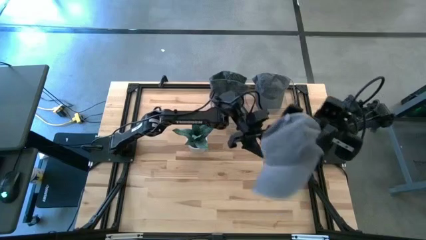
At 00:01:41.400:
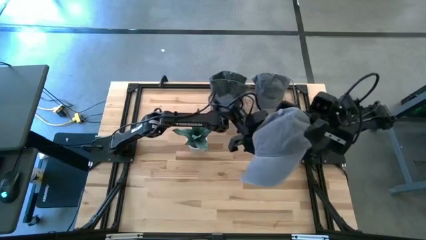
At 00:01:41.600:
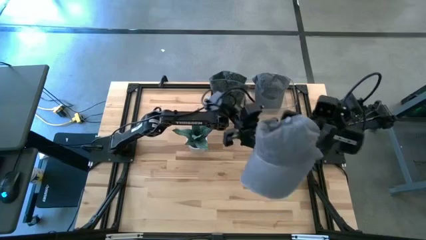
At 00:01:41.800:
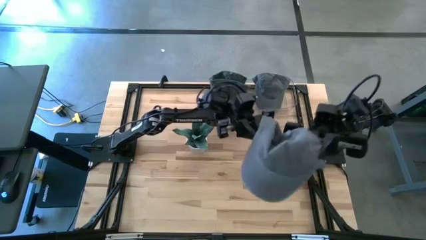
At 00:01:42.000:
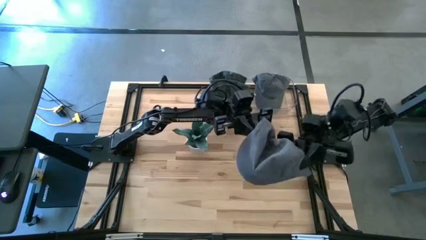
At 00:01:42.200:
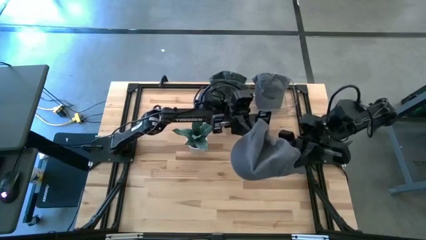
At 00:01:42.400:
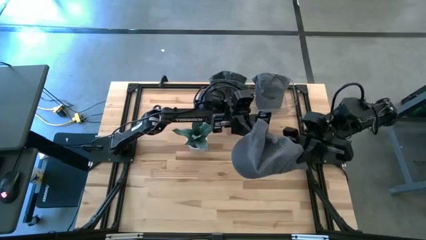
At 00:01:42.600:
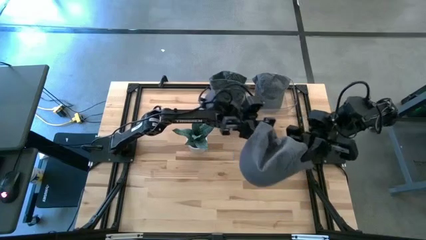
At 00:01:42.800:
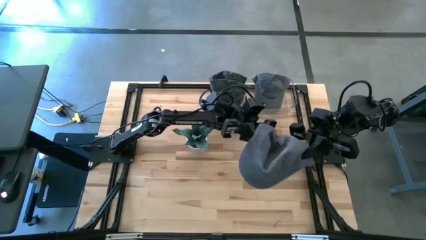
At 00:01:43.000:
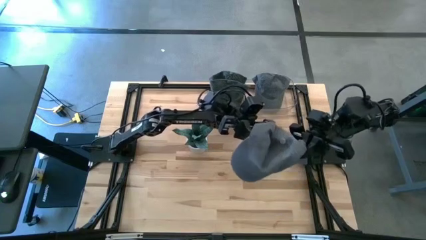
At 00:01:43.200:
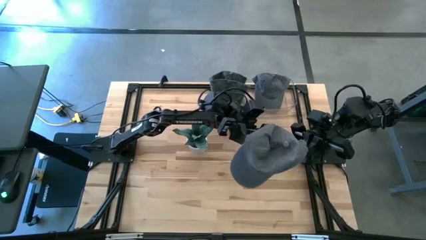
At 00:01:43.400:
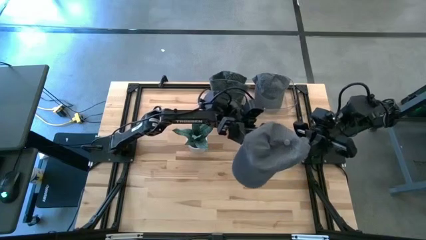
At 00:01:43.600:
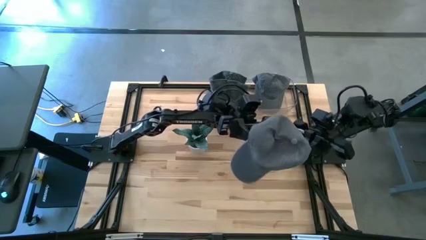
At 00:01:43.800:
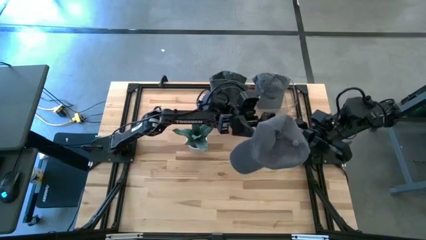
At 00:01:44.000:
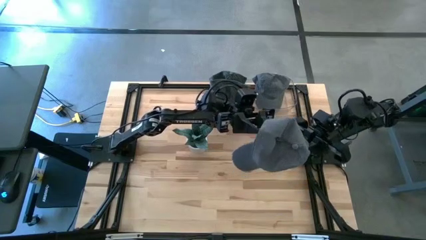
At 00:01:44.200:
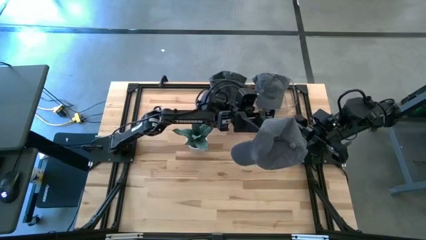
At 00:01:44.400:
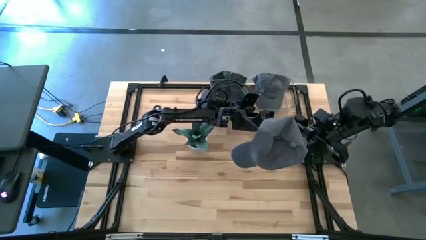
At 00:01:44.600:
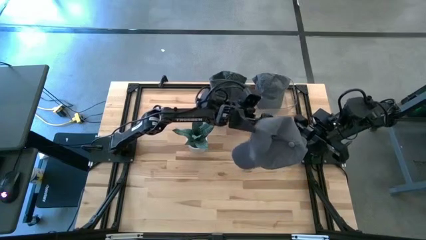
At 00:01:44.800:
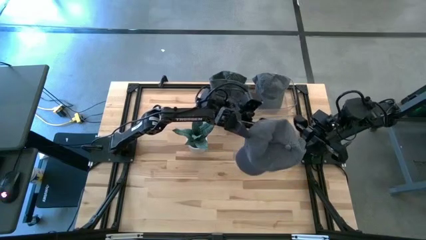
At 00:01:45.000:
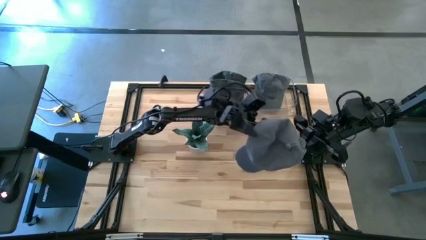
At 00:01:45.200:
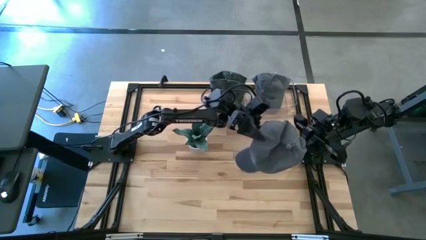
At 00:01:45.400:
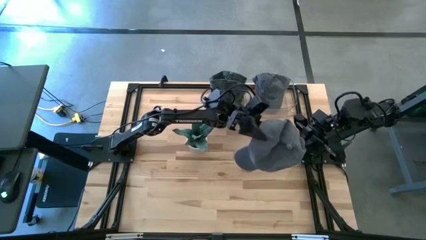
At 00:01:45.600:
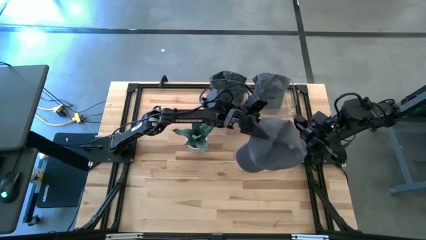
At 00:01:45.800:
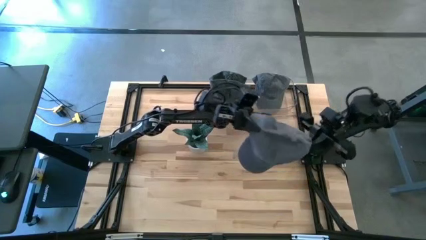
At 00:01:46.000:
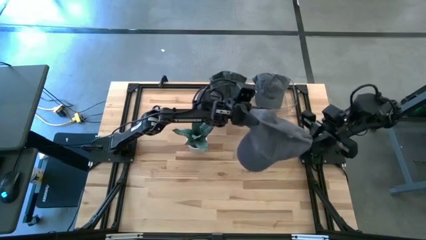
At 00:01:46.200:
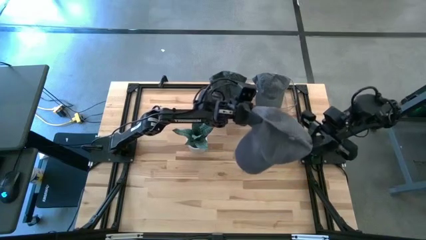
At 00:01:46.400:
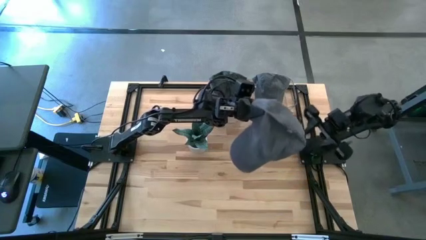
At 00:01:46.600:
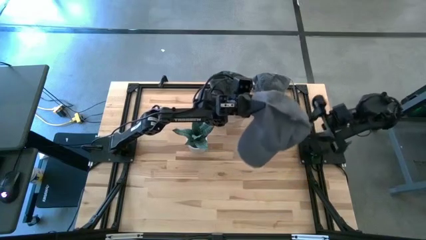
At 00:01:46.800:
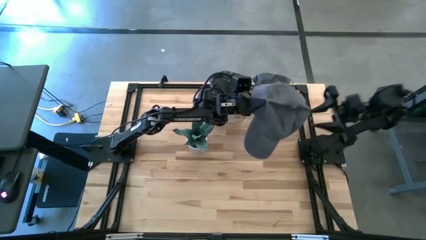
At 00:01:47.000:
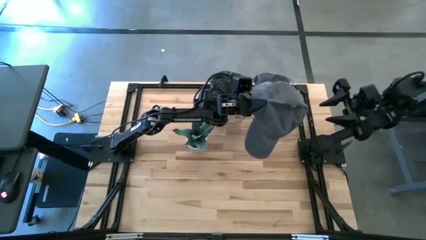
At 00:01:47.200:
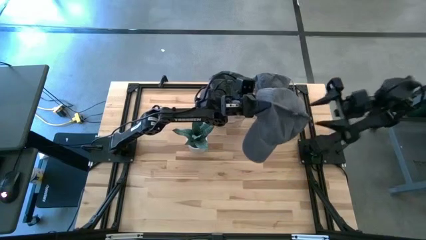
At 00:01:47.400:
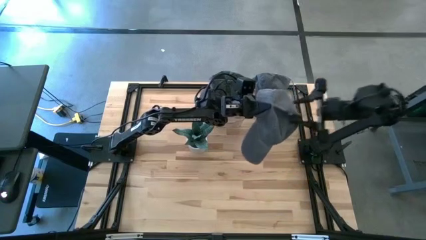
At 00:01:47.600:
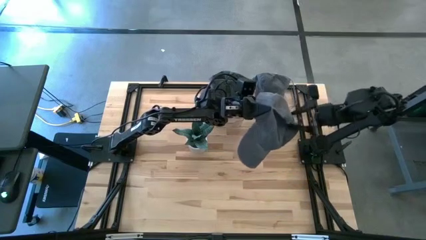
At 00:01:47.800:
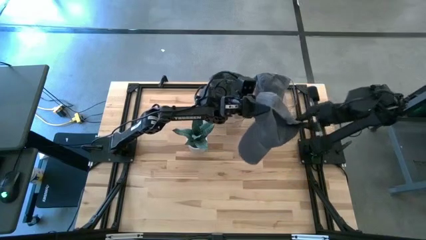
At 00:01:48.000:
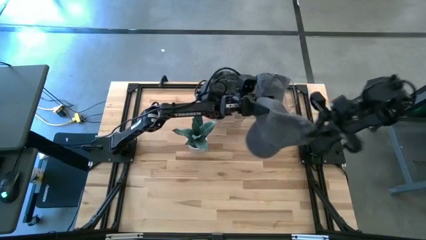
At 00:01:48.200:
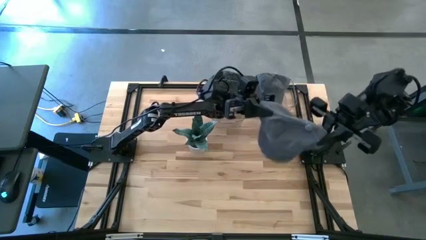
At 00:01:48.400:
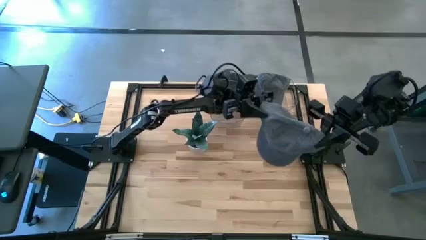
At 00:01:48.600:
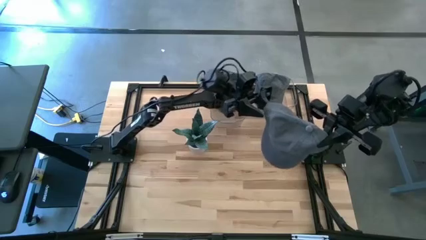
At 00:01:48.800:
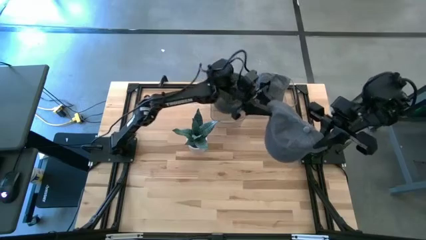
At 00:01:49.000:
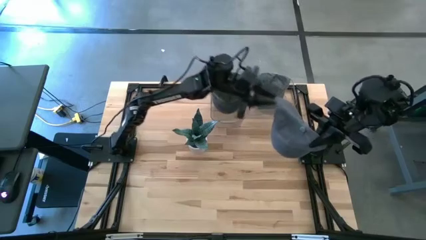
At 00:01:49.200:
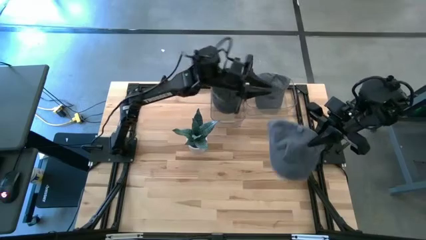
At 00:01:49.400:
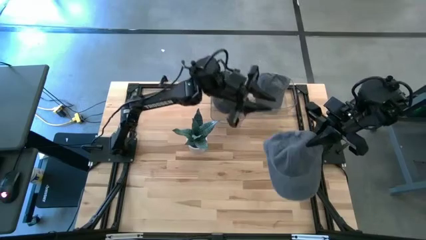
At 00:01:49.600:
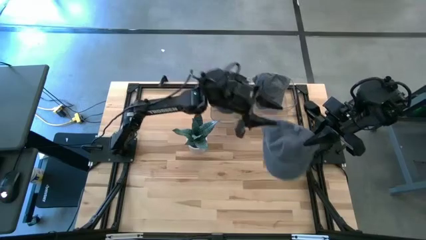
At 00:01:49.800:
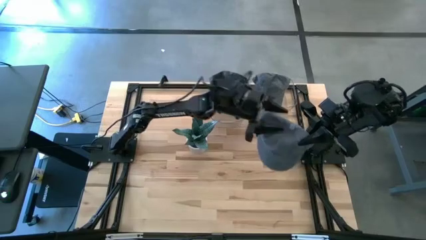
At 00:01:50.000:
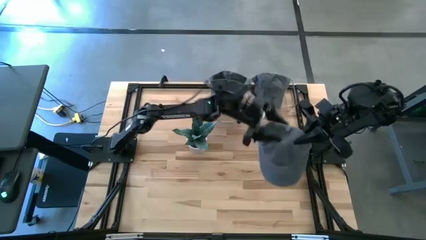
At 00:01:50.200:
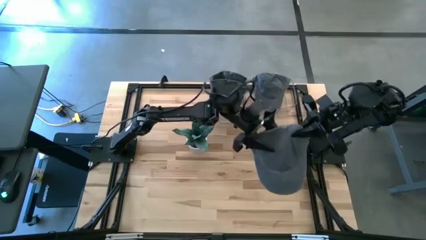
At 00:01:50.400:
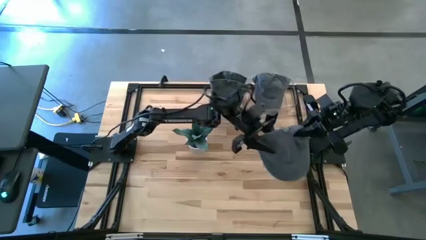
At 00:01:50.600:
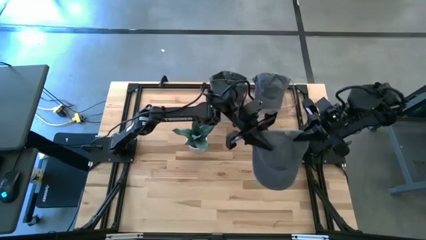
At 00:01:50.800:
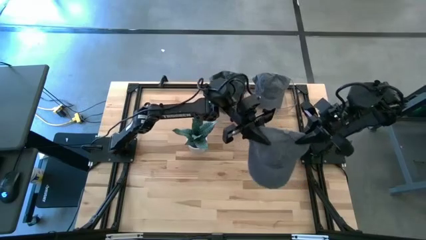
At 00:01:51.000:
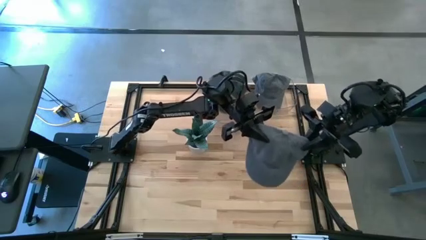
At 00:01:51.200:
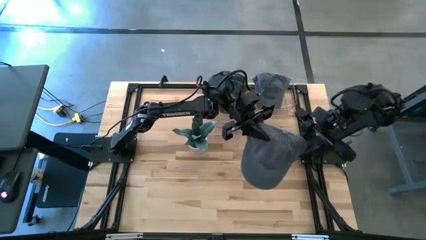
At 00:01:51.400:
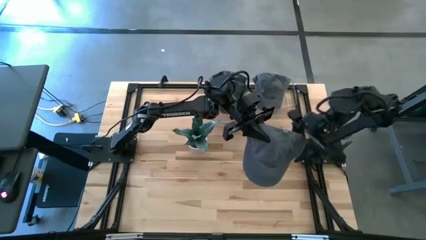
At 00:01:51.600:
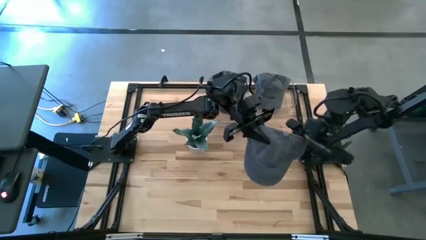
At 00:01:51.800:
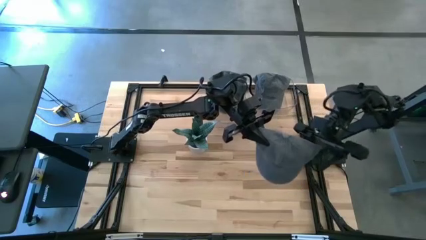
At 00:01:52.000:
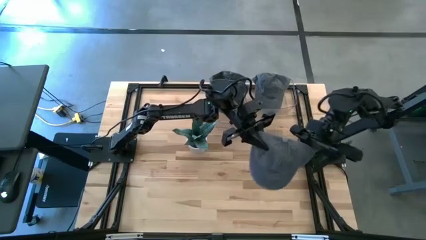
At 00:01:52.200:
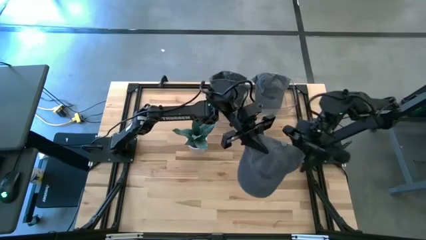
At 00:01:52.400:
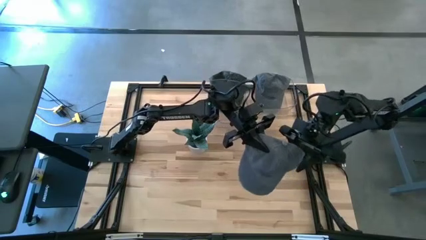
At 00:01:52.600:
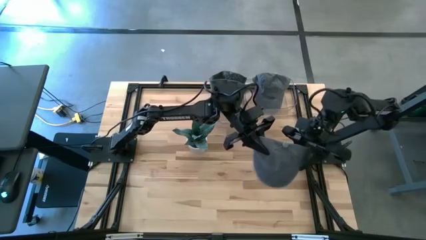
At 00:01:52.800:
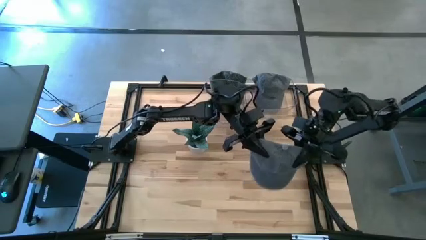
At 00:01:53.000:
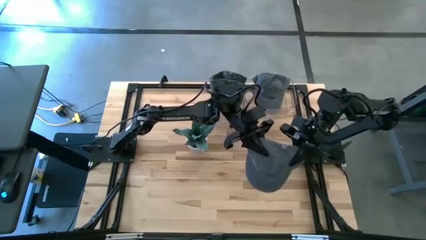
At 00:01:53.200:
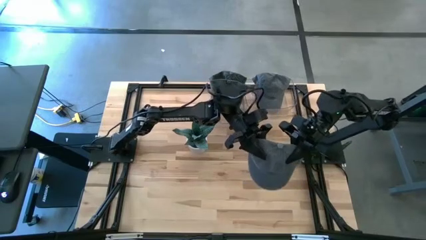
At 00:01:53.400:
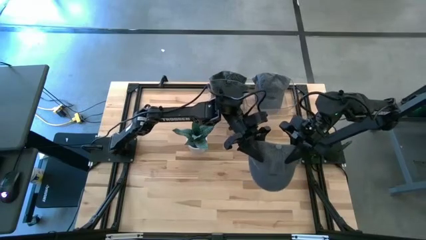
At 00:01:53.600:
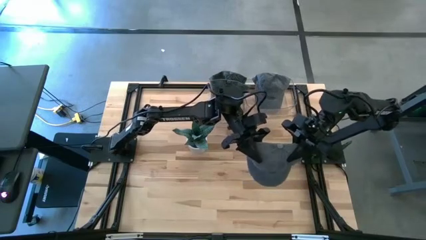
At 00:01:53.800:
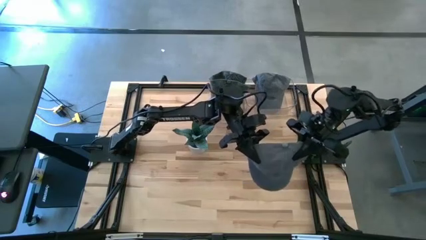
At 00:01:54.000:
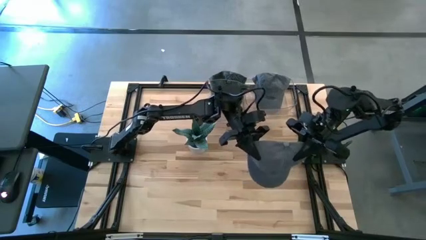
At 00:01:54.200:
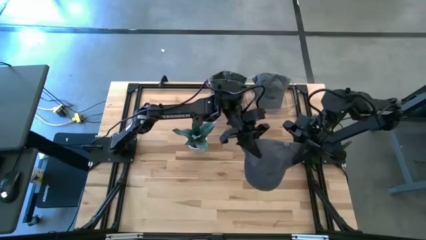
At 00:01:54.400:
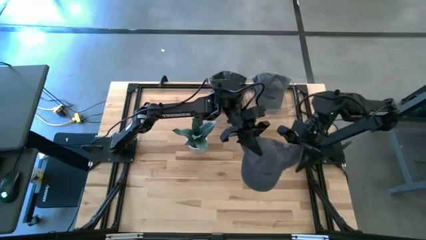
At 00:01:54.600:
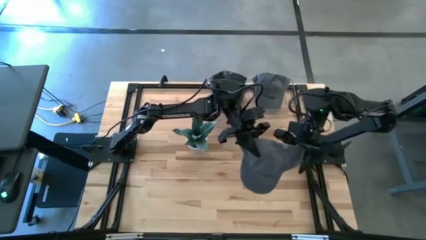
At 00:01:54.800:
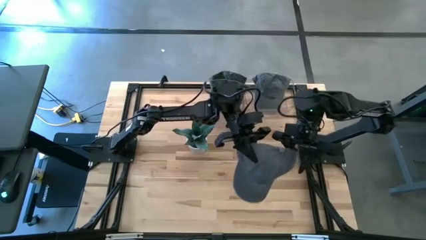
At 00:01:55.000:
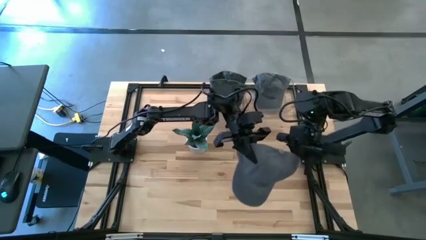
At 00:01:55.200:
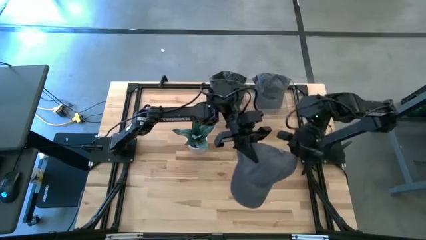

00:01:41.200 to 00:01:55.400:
Task: Pick & Place hat
Put the gray cap into the right transparent bin

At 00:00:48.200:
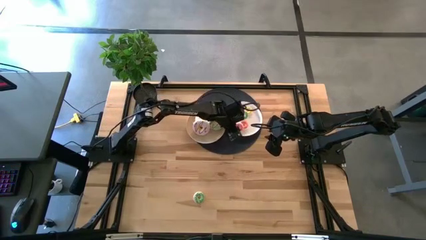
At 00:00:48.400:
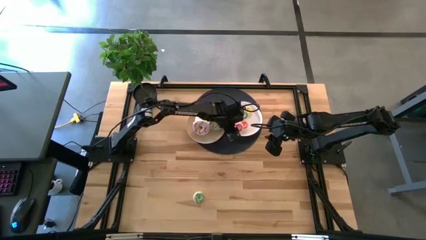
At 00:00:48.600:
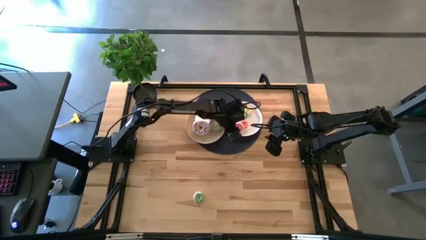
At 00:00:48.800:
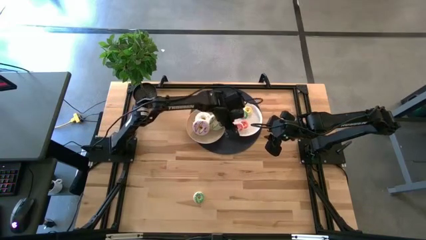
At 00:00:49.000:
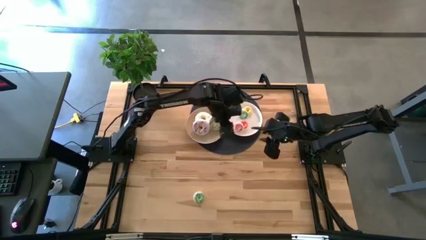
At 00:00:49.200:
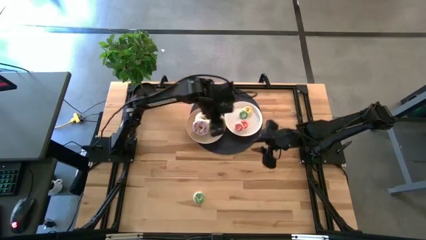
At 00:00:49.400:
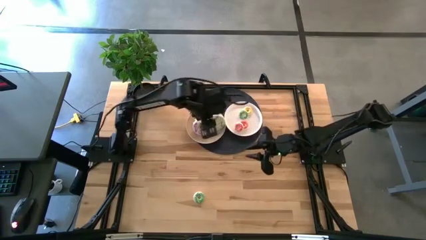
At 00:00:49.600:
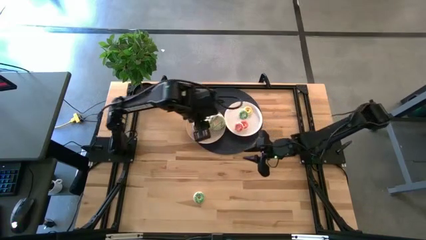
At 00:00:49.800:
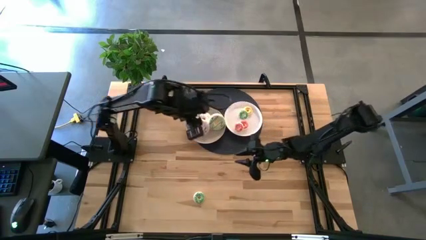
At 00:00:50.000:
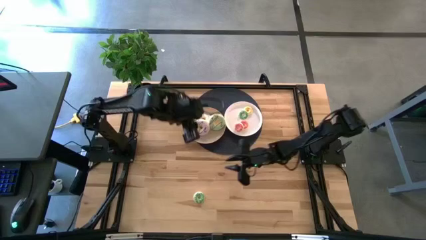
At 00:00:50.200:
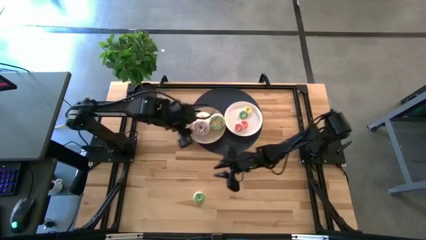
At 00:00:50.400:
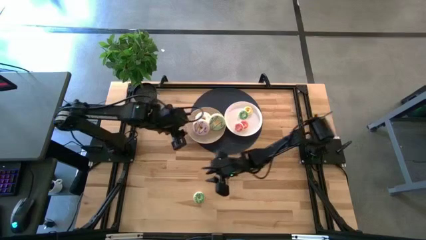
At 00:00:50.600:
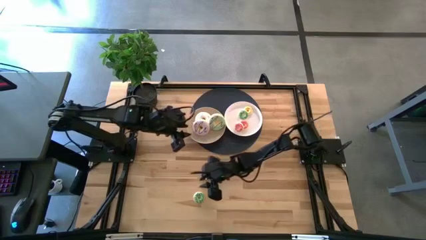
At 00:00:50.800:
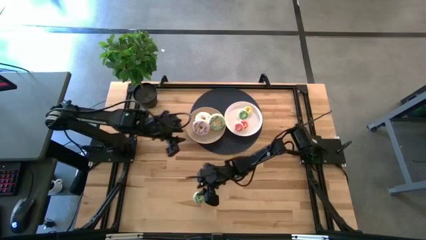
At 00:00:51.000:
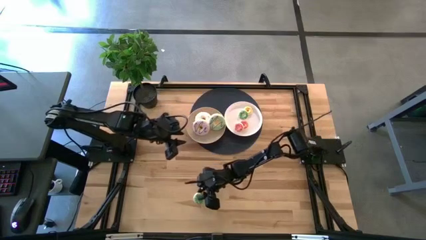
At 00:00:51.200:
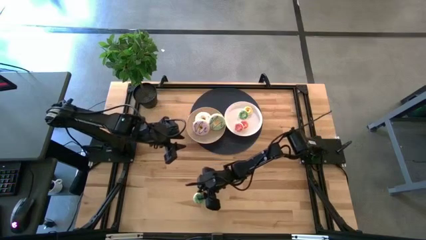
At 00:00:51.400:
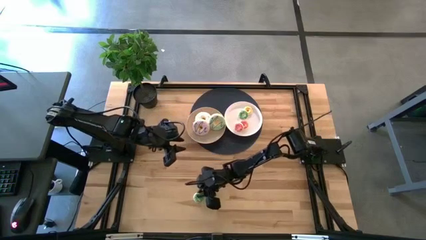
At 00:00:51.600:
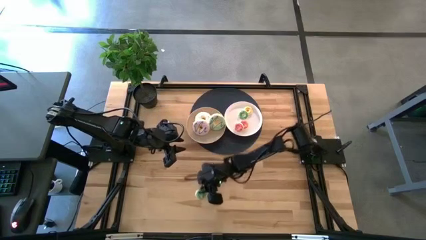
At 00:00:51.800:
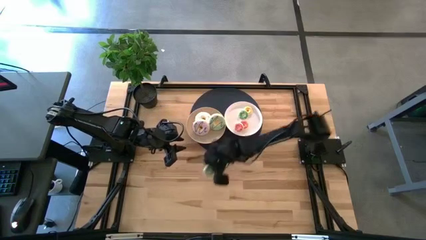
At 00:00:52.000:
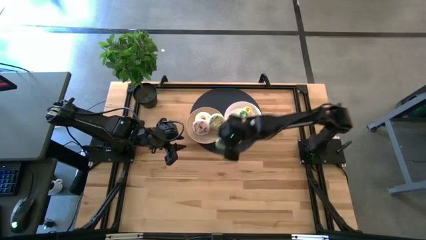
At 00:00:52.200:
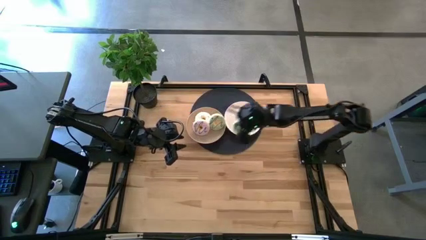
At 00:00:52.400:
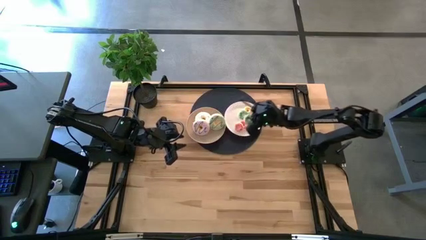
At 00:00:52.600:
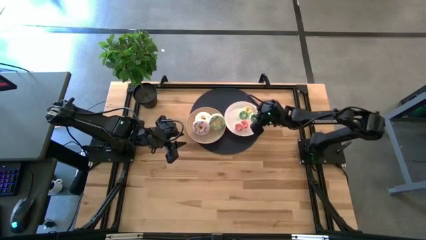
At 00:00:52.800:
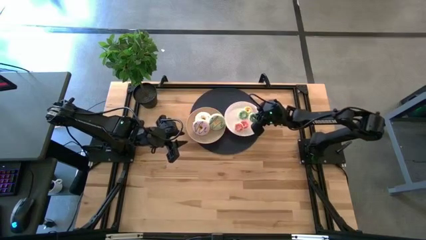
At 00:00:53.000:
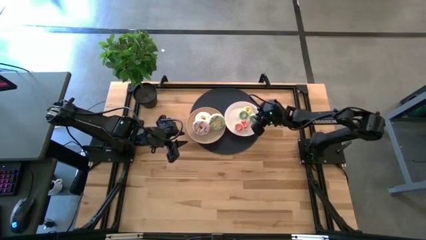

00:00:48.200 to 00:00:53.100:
Task: Pick & Place donuts
Put the small green donut on the white plate
